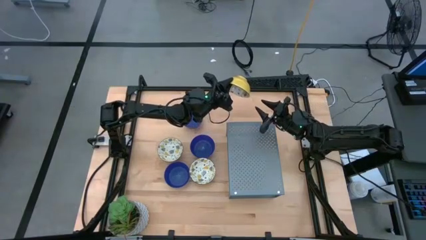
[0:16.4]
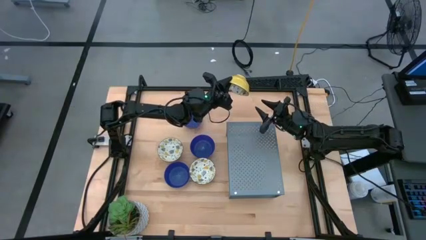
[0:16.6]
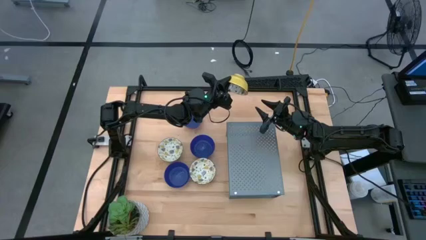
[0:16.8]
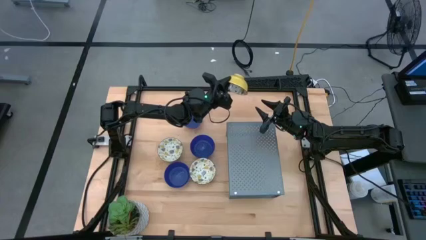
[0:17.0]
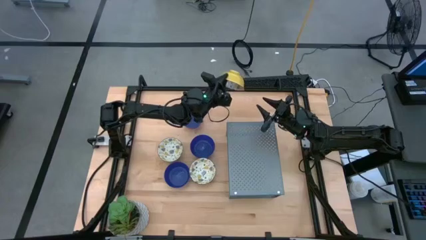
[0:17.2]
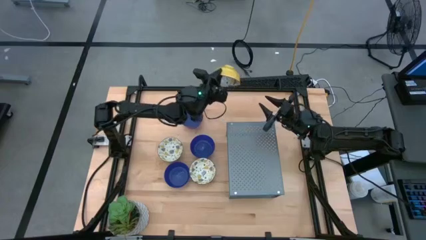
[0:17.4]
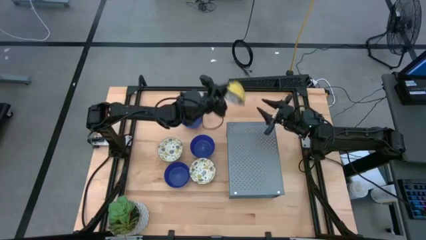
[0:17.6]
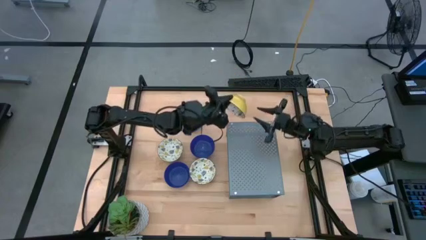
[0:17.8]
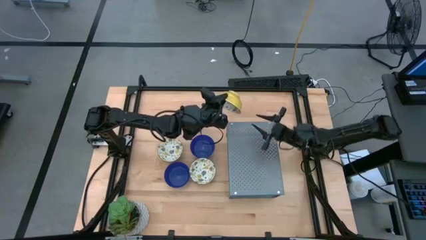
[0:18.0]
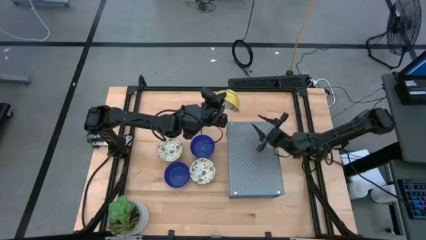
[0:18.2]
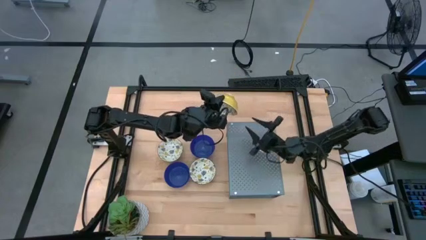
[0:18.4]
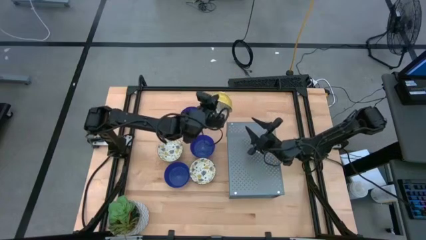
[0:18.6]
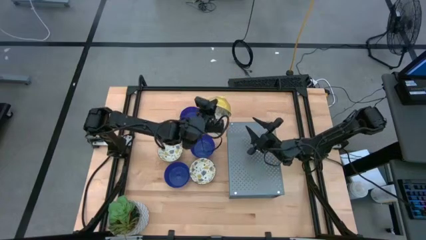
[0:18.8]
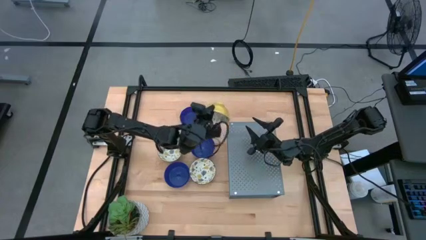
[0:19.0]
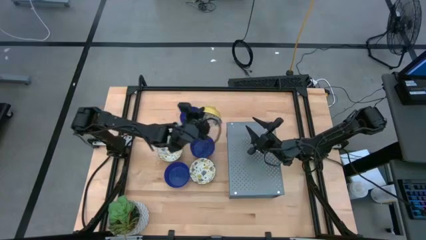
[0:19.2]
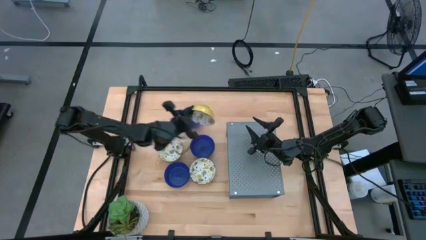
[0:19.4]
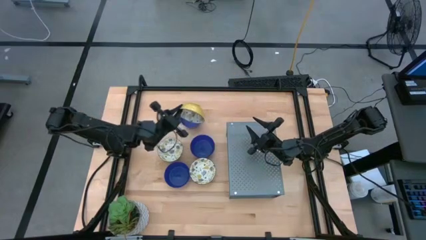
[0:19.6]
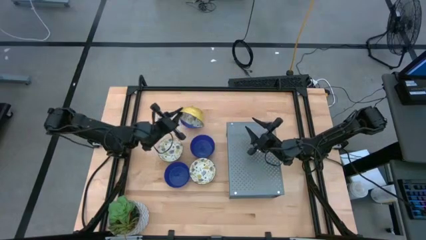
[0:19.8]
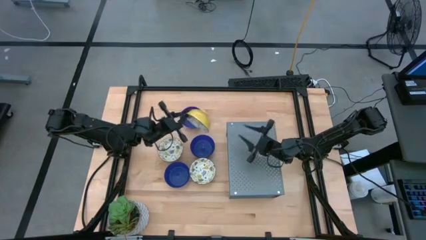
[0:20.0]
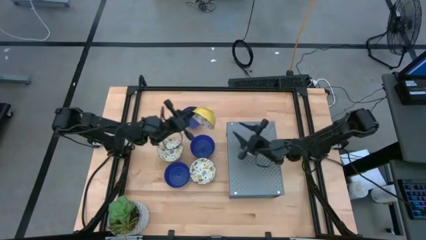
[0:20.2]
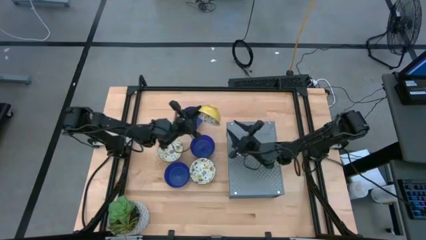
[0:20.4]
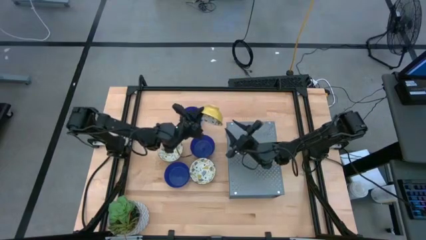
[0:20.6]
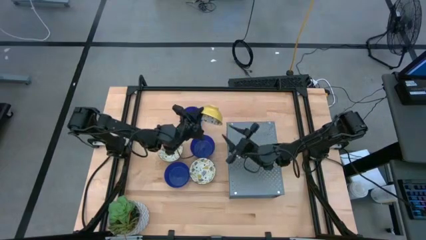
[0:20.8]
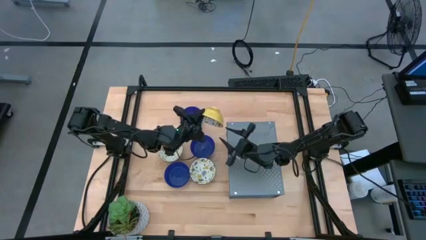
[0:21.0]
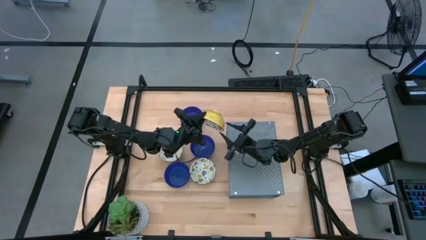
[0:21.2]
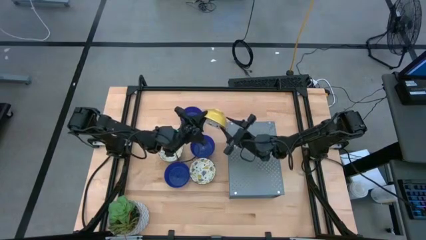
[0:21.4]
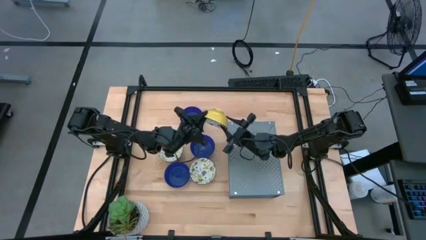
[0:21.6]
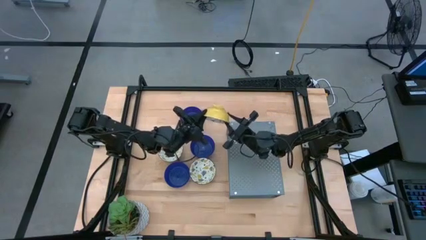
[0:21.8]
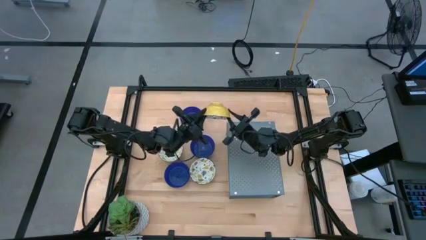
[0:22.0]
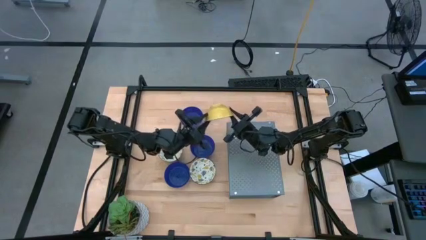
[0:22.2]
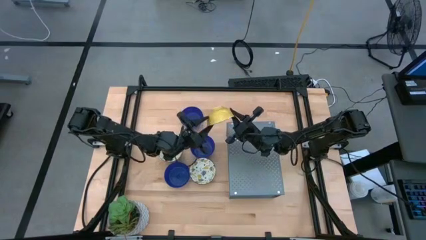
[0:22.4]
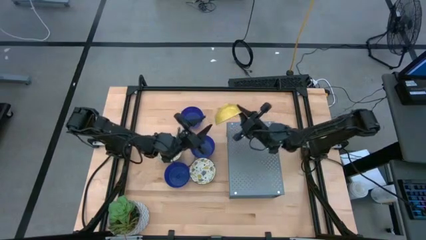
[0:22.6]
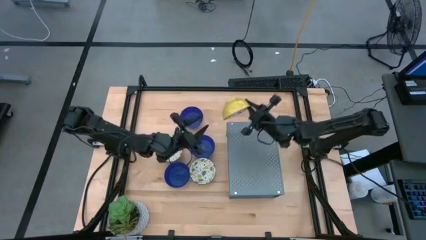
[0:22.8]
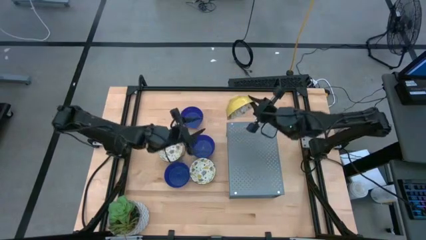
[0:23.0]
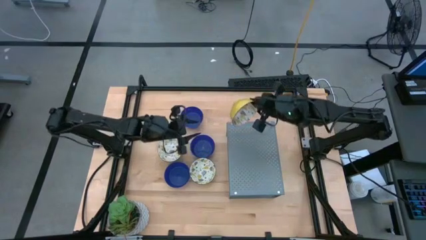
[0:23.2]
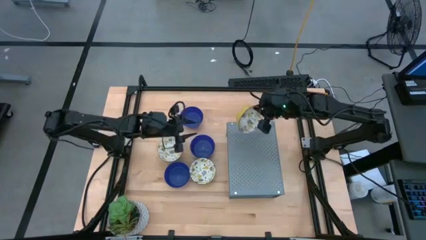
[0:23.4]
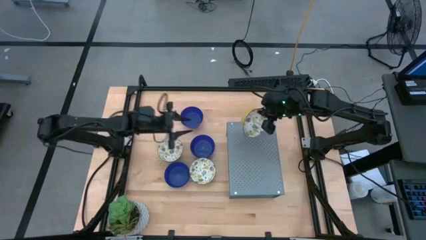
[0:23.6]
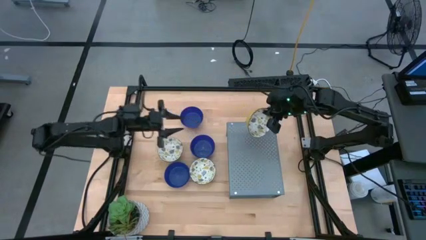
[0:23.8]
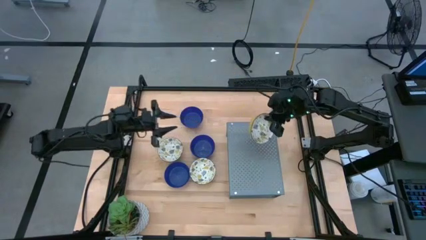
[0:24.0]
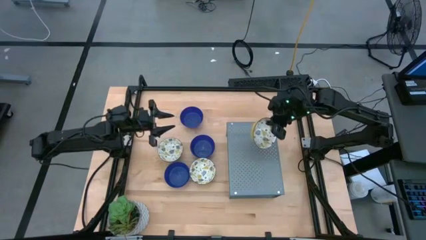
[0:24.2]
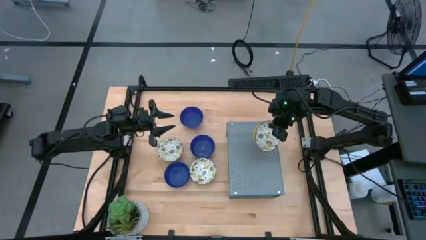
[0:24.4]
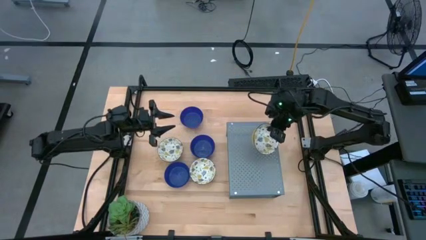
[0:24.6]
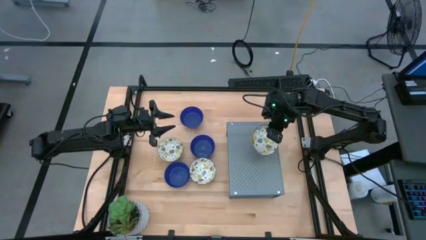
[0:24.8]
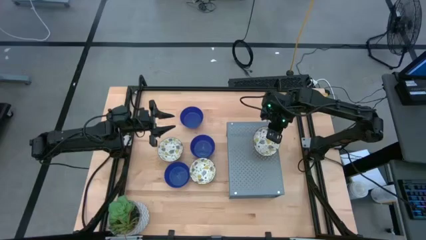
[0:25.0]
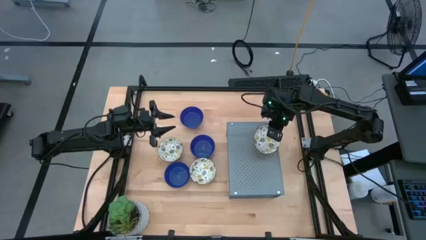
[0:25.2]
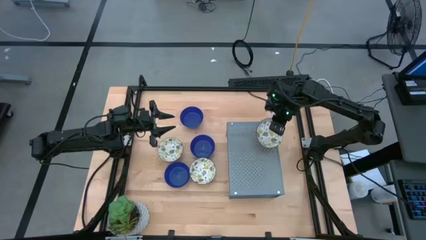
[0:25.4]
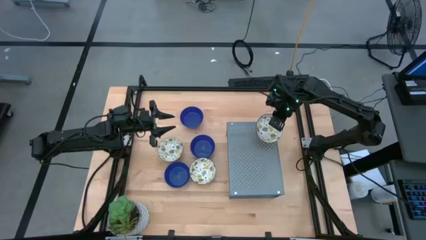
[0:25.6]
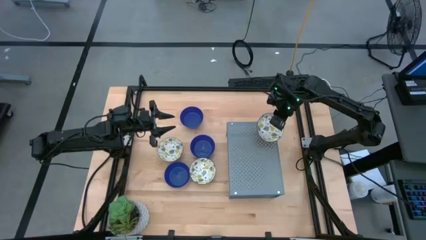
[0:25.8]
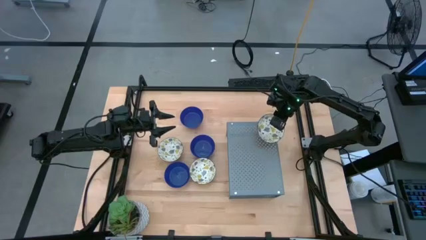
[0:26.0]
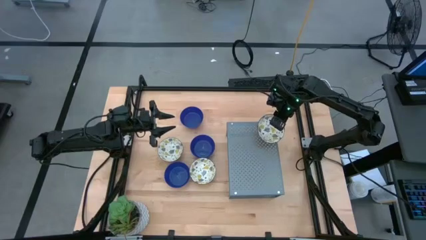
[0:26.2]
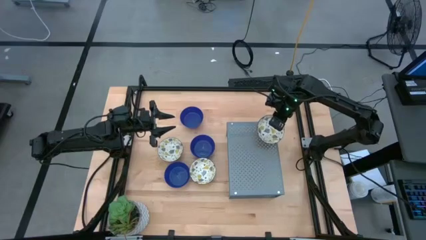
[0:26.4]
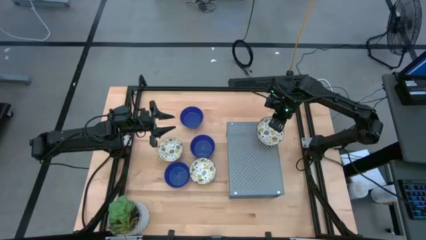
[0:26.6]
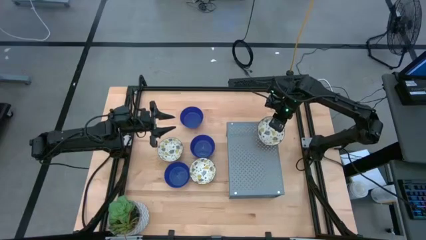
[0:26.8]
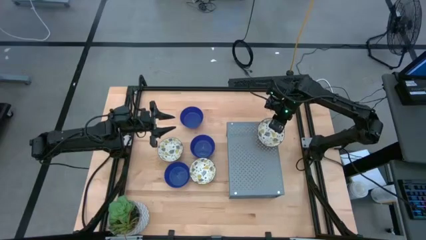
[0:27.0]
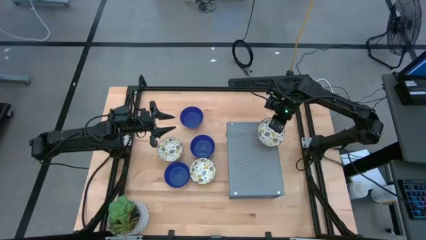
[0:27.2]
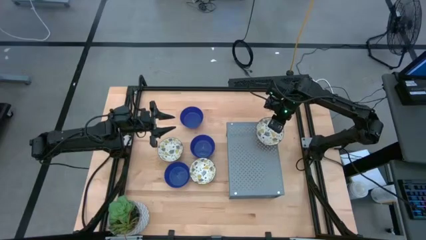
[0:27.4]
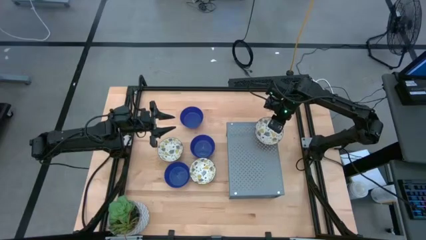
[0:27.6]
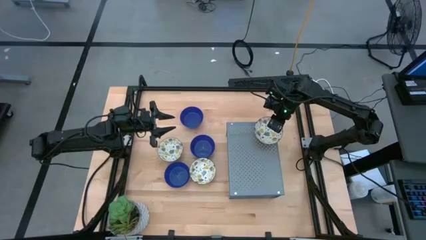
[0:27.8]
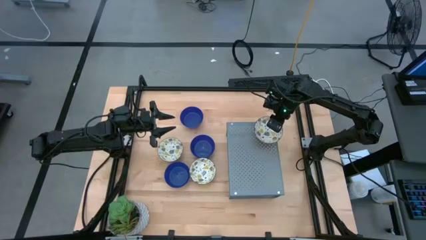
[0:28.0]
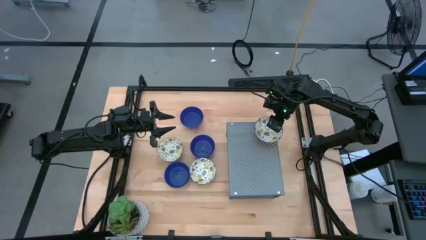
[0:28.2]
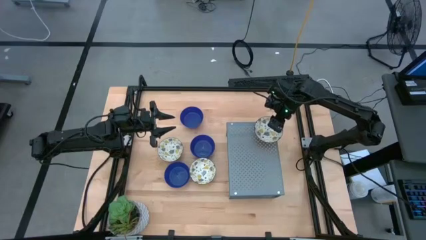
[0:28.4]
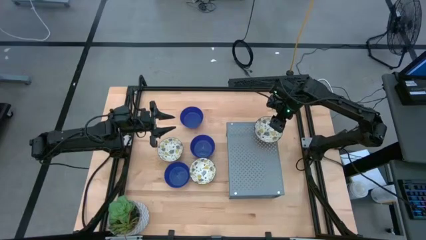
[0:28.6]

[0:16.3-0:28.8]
Task: Pick & Place Mini bowls
Put the top left yellow bowl on the shelf
